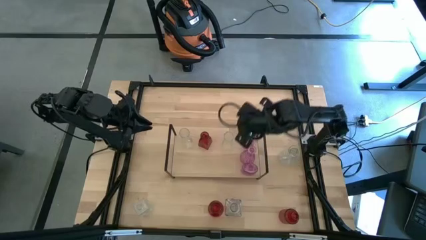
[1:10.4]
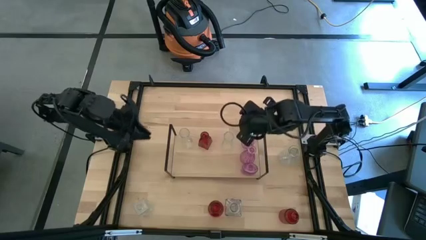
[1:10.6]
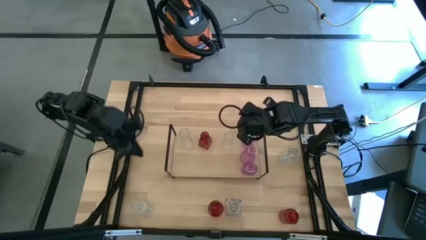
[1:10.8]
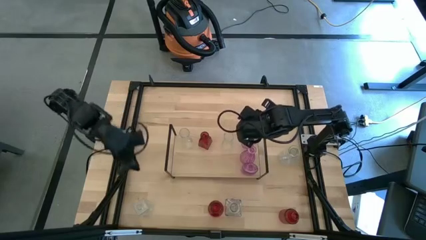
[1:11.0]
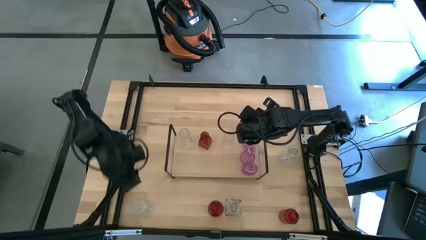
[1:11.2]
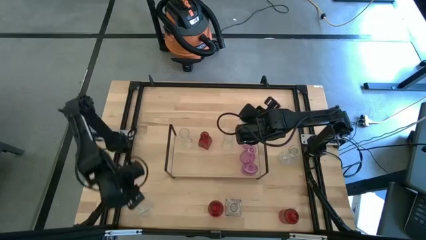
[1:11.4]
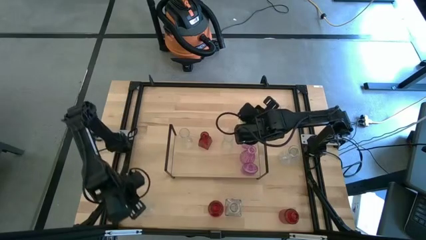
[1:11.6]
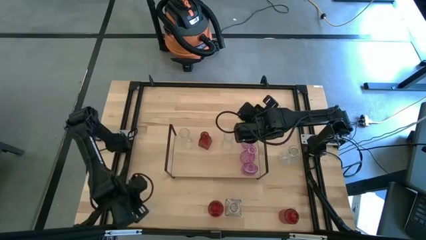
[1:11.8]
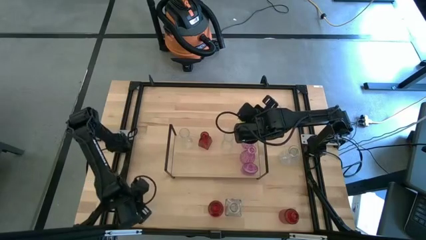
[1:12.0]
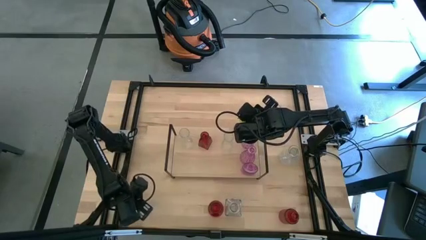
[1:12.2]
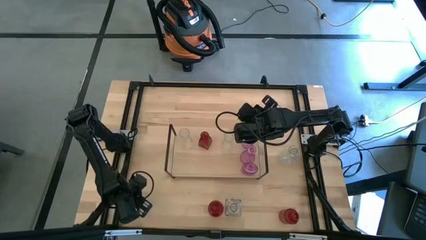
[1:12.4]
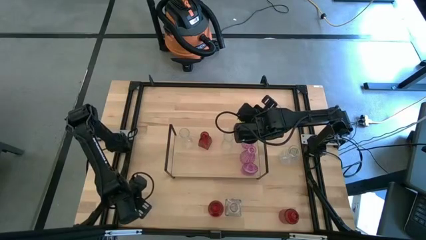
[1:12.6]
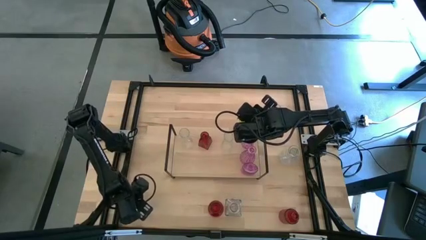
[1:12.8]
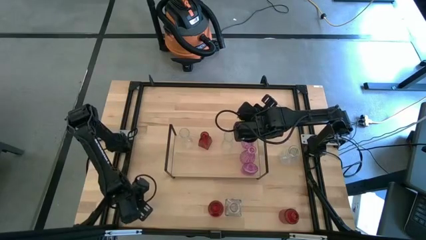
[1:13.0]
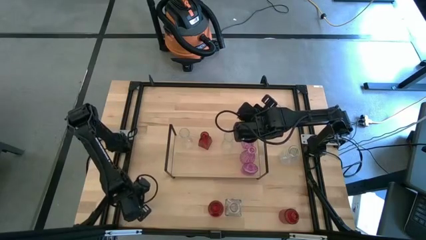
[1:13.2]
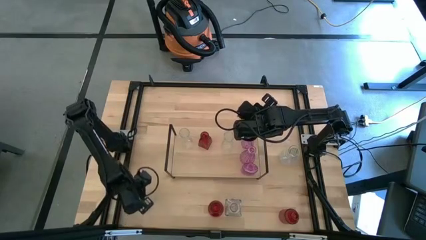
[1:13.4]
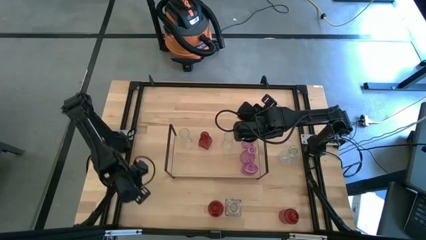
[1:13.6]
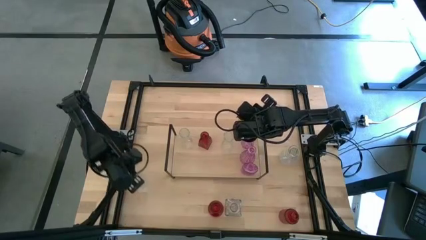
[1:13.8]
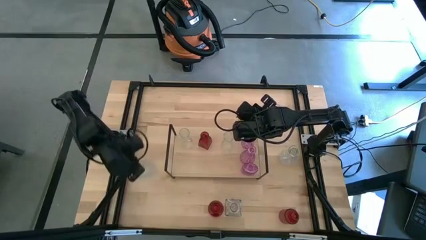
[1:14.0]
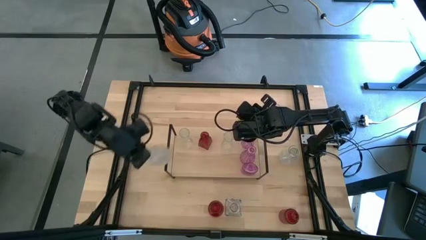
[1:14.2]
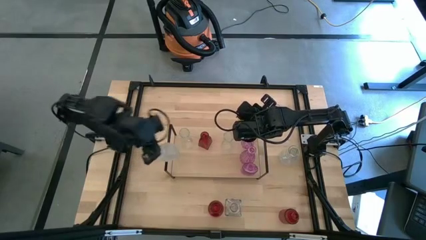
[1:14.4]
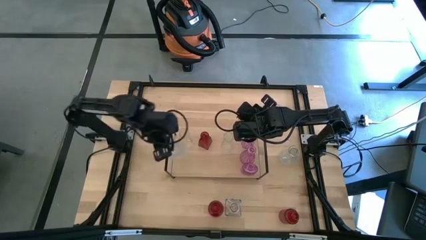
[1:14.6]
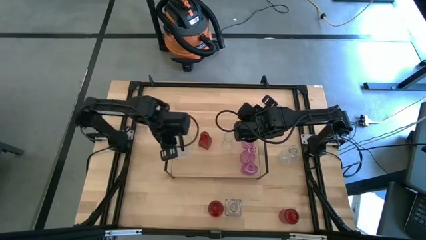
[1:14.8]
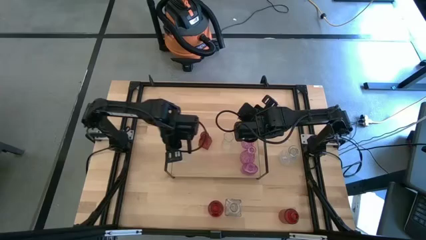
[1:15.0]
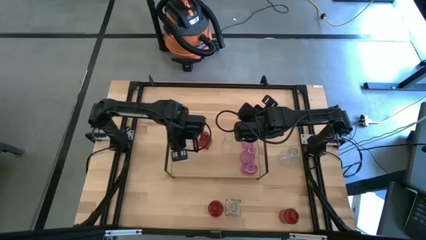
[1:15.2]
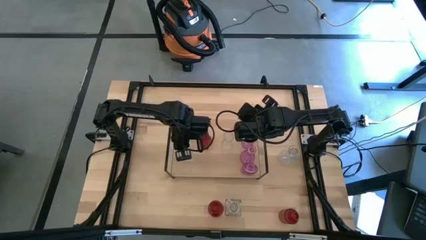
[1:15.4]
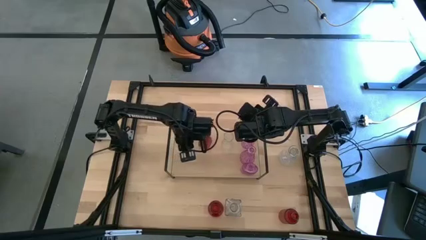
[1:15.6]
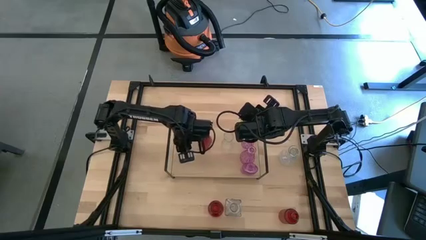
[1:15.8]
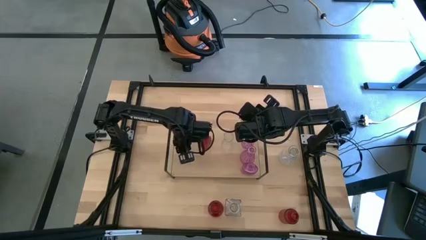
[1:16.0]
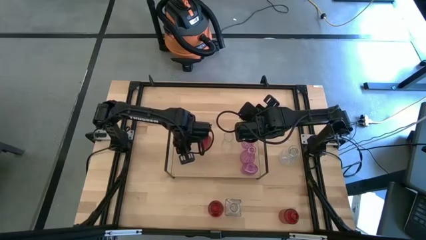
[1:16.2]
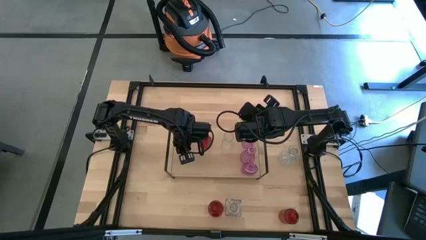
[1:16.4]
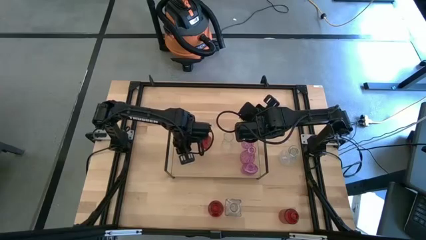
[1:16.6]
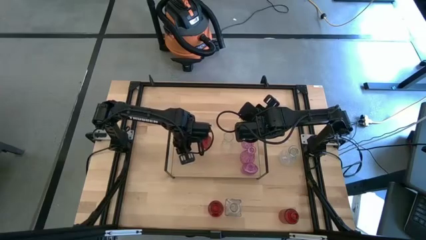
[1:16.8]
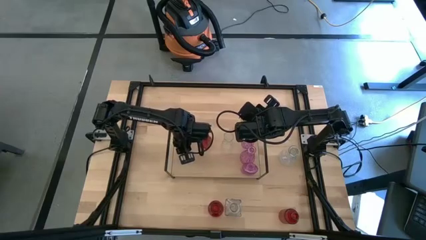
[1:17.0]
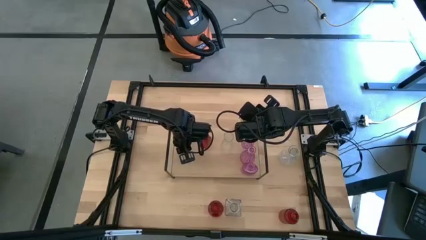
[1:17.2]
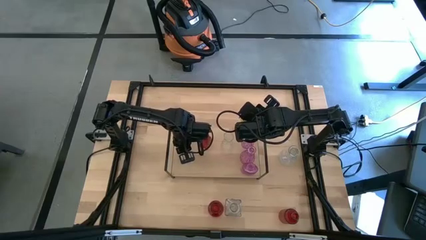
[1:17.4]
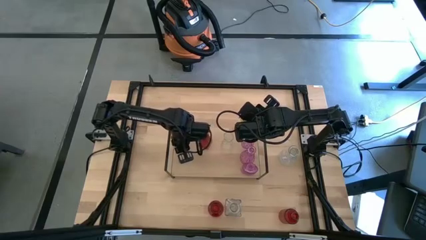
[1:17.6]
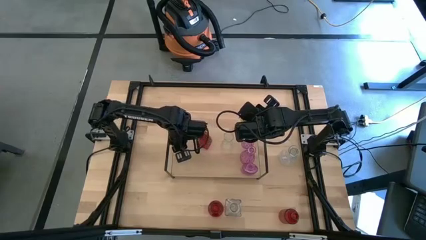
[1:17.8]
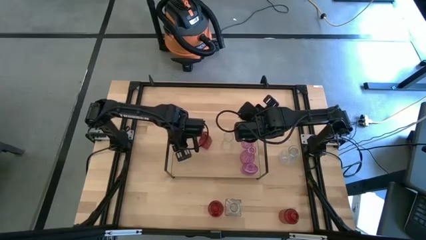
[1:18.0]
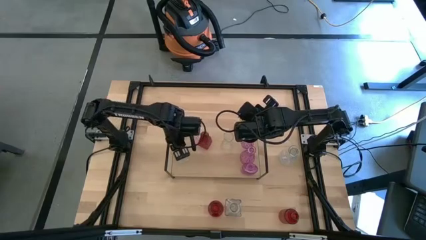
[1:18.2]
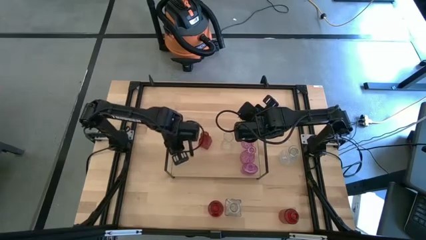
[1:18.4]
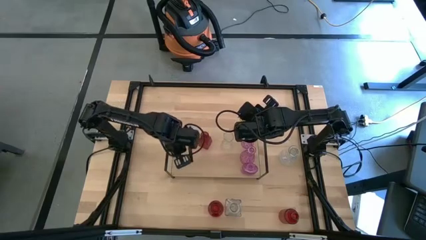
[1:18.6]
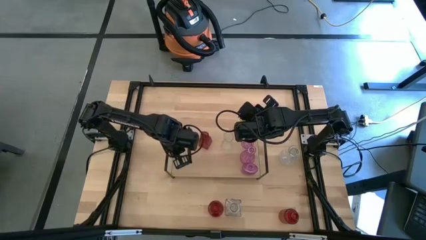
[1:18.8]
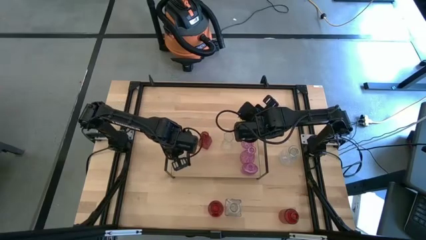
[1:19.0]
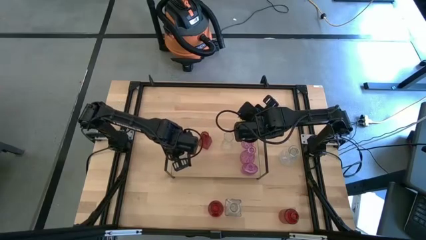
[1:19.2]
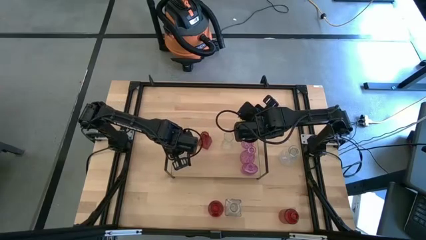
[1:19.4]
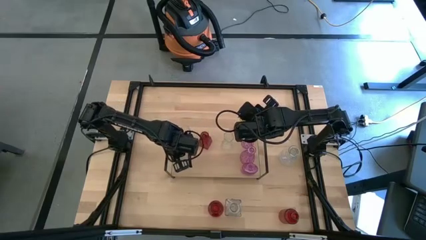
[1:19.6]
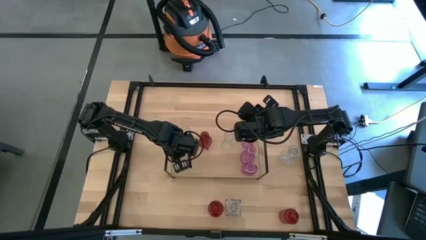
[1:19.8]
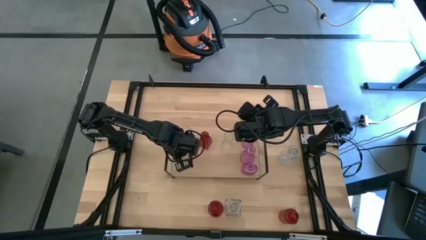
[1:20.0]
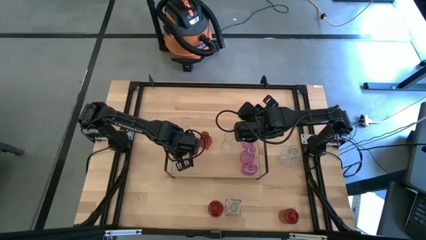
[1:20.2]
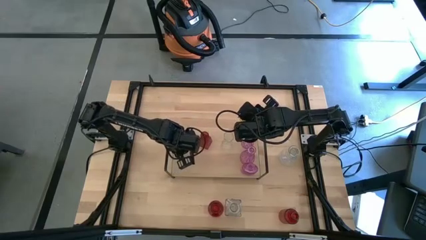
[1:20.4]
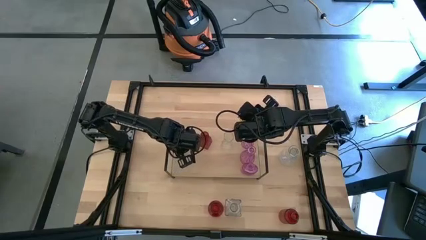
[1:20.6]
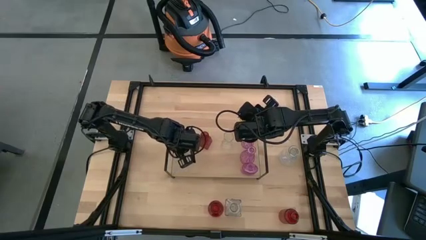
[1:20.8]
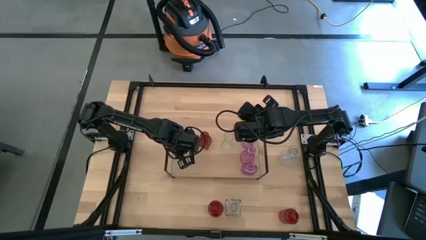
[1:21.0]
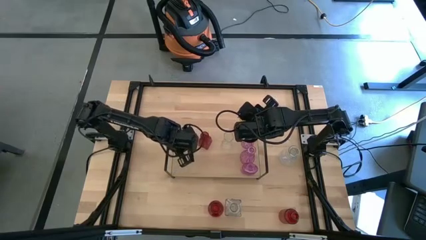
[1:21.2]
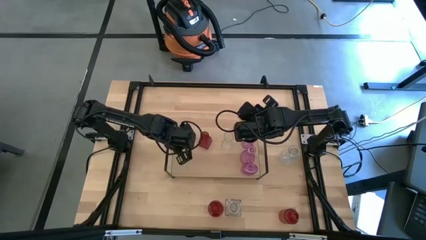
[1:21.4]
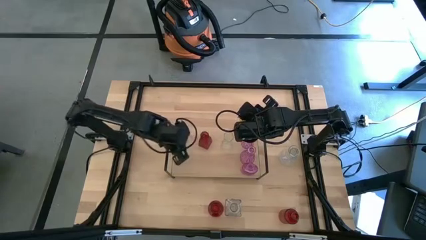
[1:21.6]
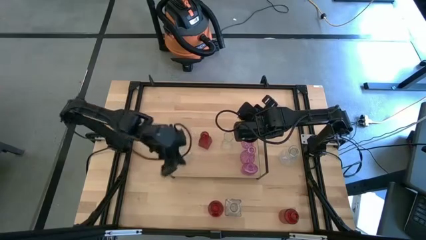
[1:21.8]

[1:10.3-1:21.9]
Task: sort vases onto shelf
Put the transparent flower vase on the shelf aligned with the other transparent flower vase
